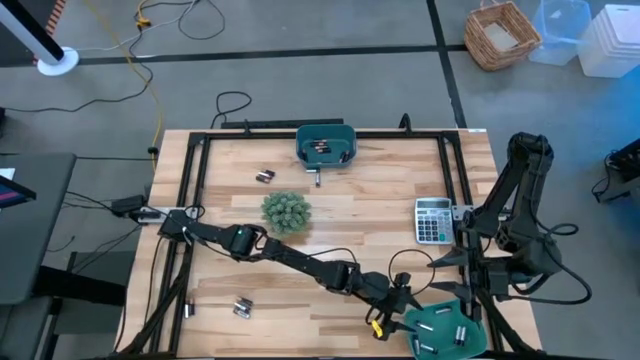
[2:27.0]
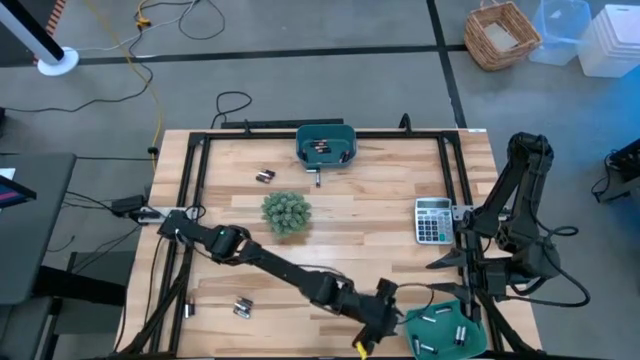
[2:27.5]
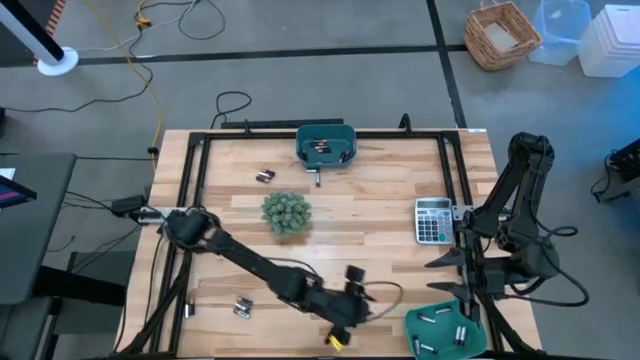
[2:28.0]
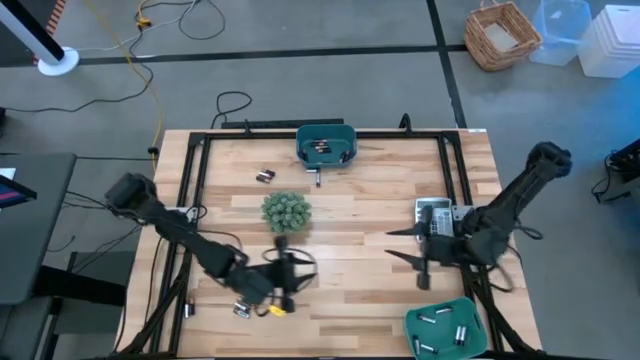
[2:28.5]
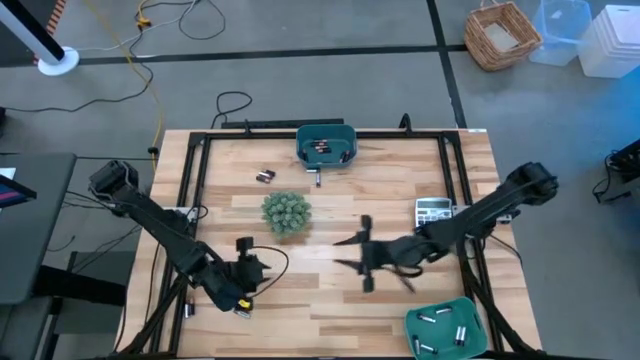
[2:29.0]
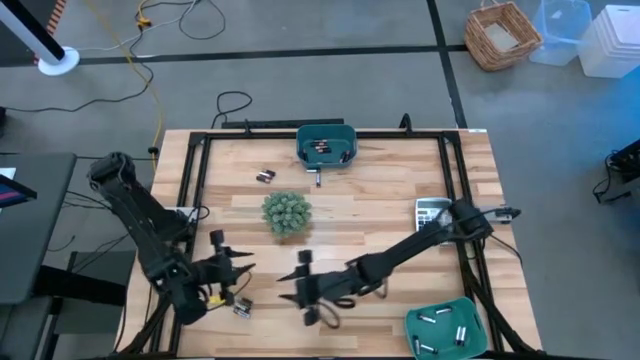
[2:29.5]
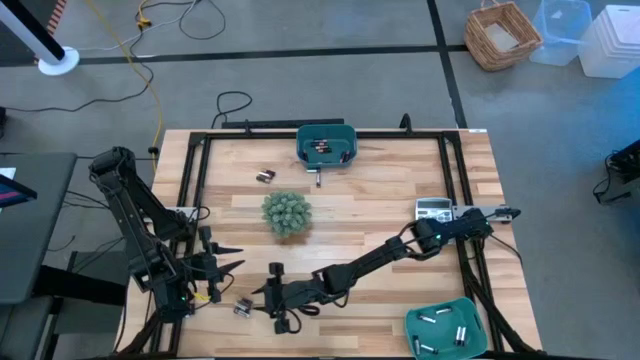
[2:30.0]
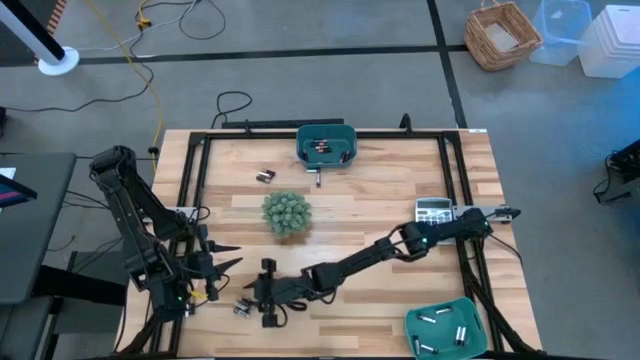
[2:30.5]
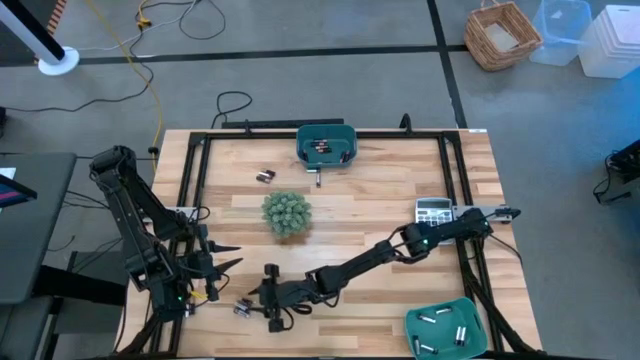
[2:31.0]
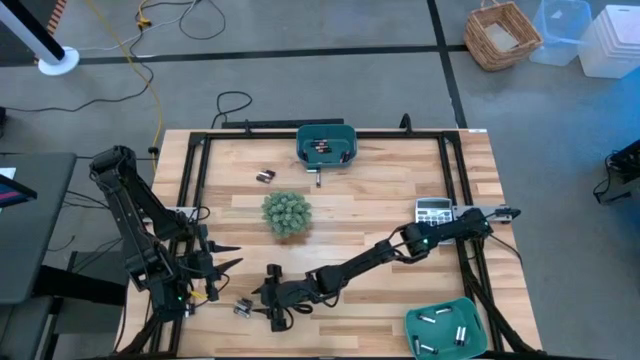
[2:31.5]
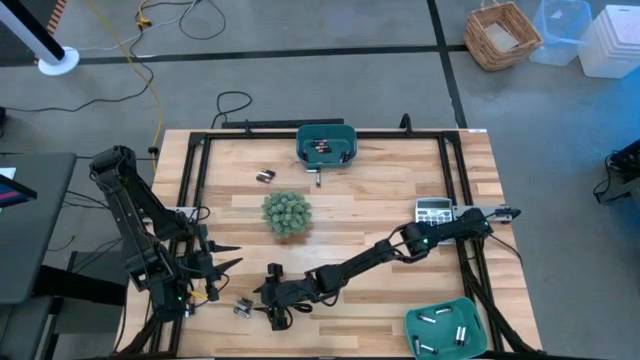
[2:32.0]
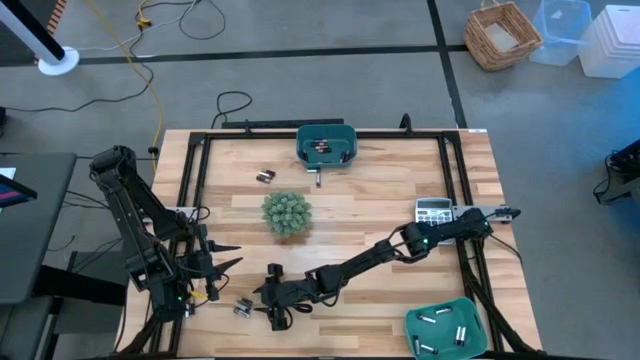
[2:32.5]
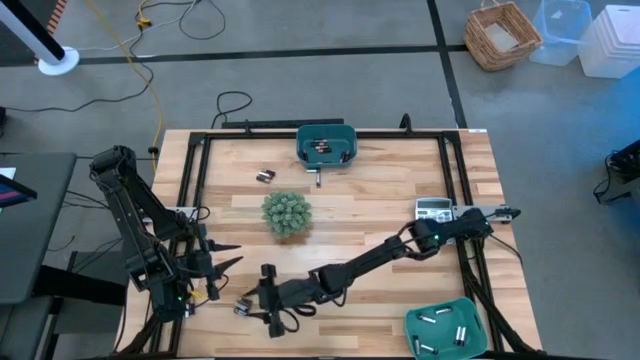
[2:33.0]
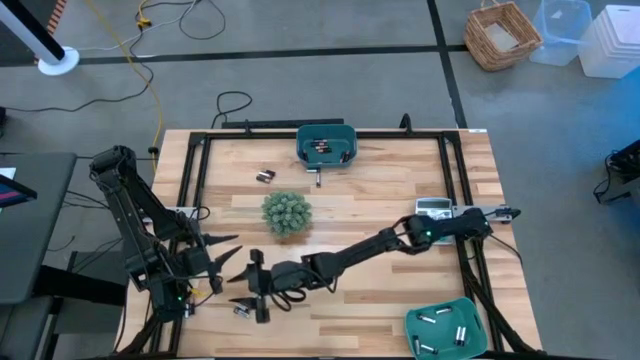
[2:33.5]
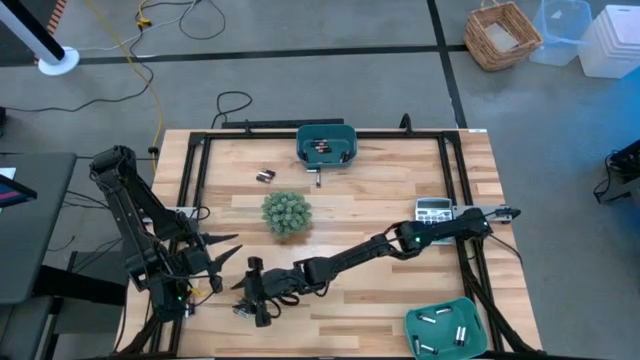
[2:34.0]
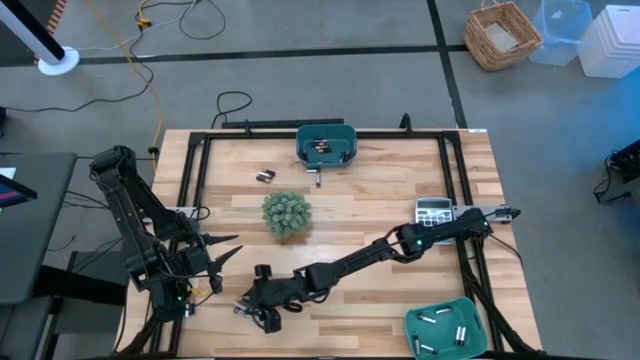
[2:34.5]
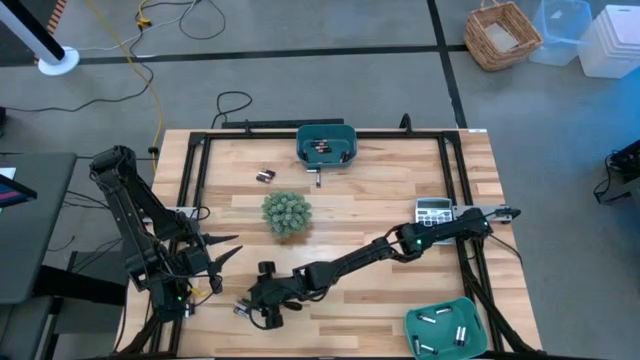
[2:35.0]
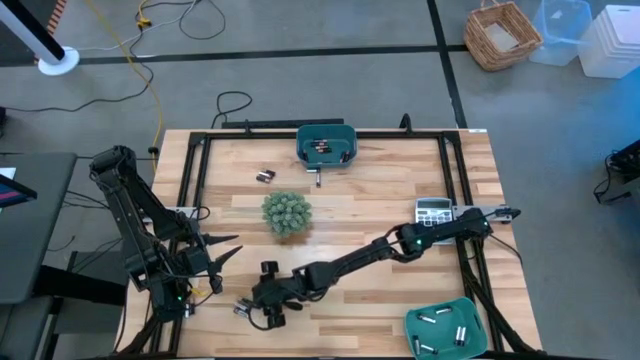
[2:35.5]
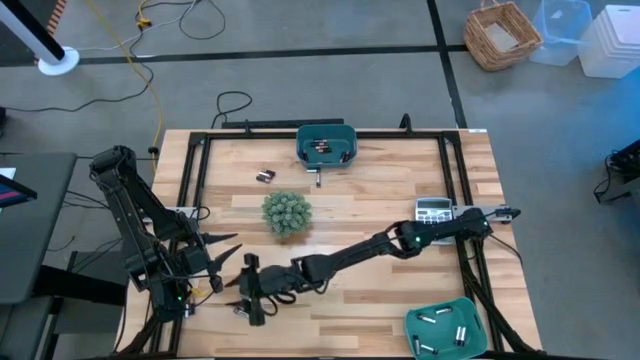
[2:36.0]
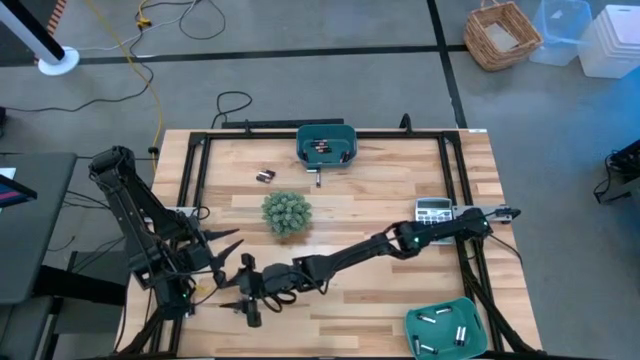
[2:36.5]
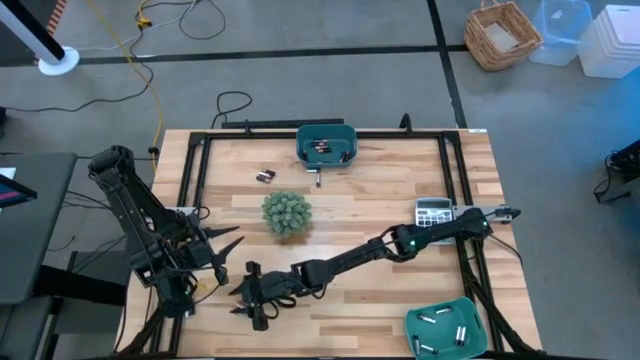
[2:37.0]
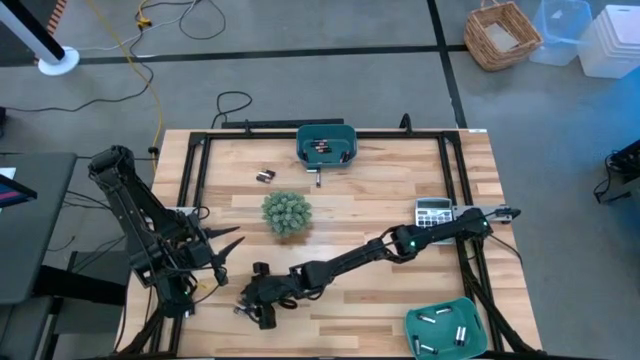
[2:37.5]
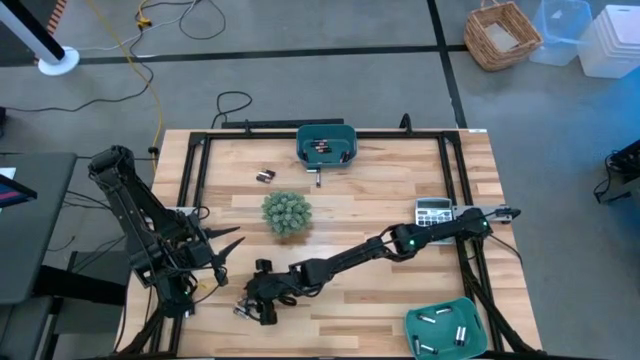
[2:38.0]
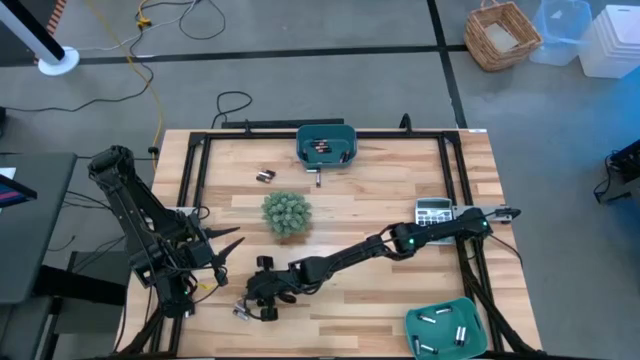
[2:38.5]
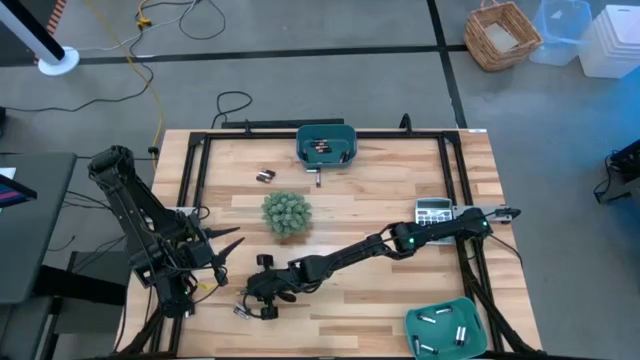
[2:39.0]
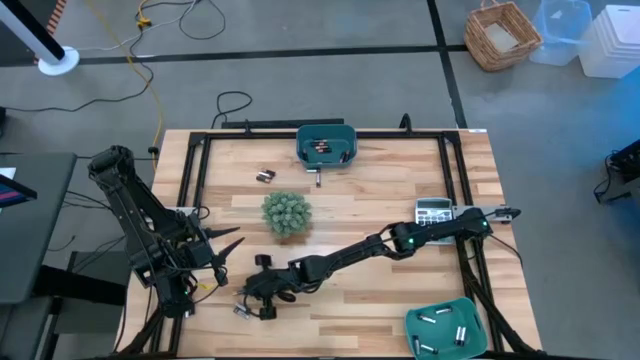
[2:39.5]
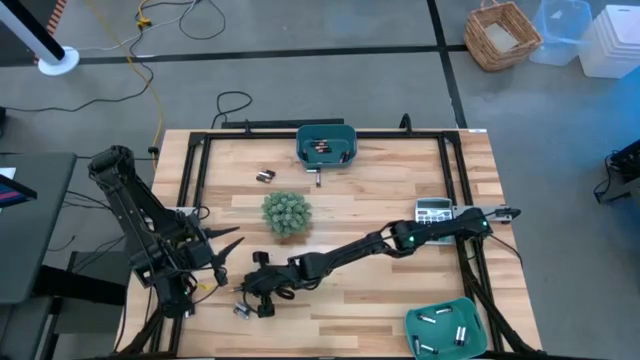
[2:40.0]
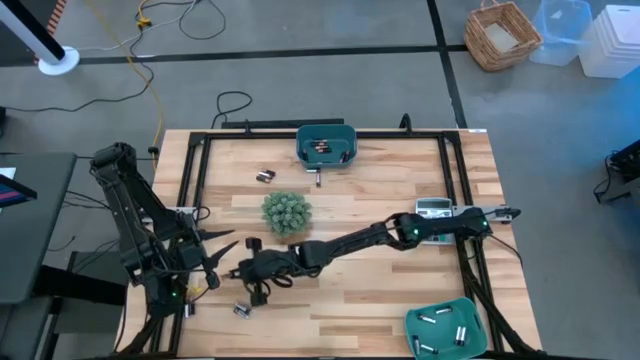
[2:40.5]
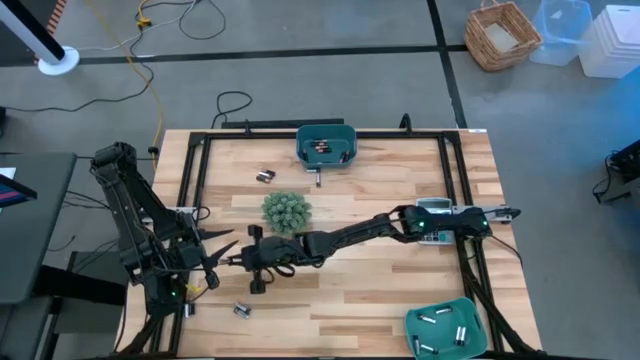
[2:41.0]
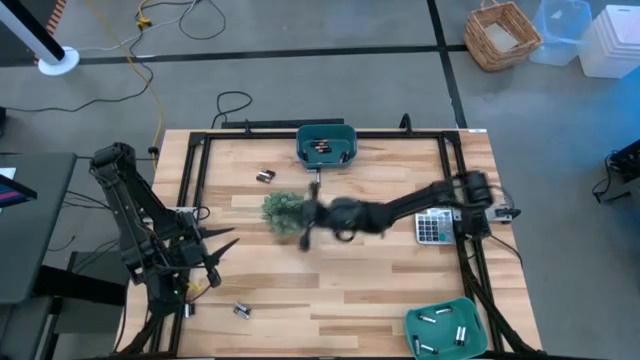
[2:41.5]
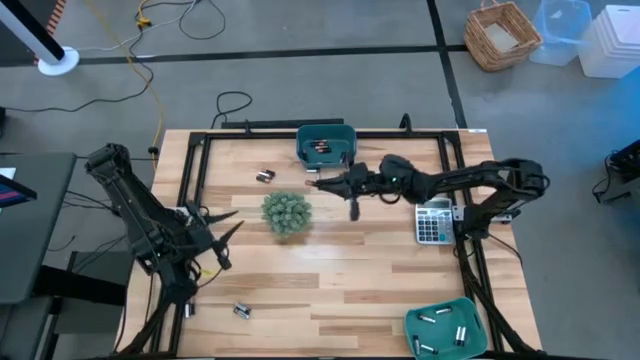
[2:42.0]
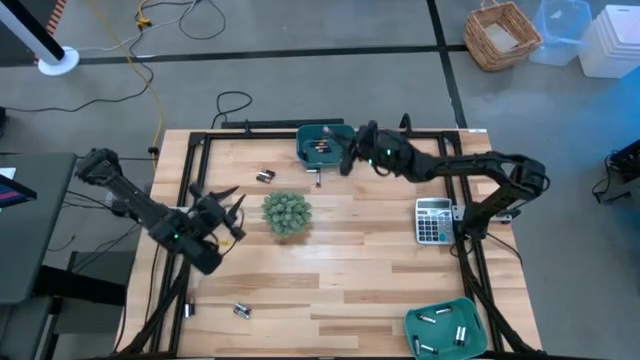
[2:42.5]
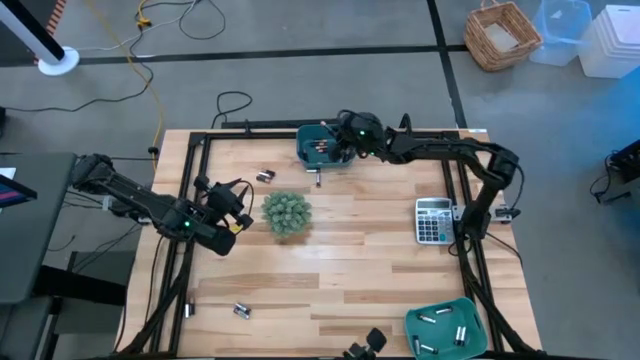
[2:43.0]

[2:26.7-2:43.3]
Task: Sort batteries
Put the black battery into the blue bin

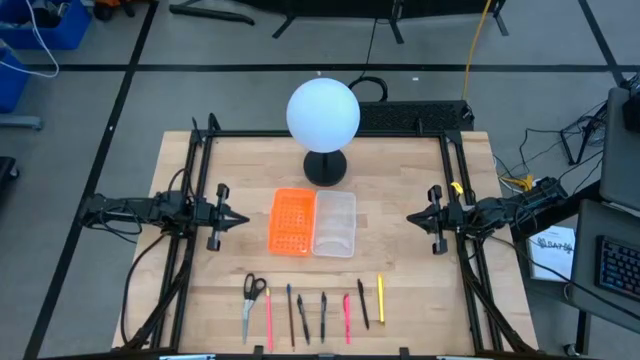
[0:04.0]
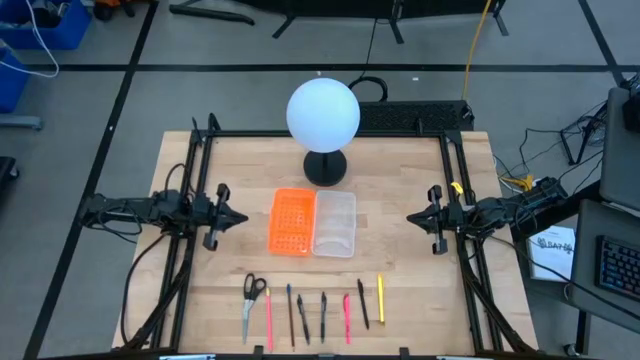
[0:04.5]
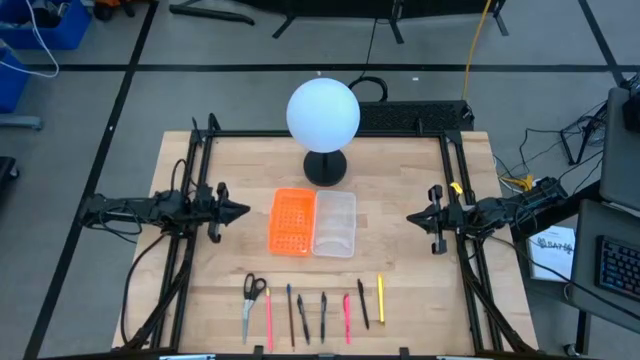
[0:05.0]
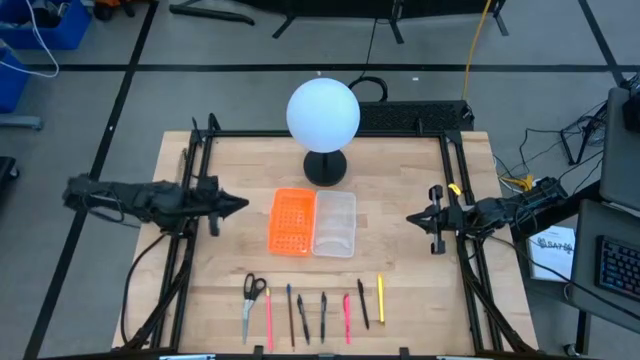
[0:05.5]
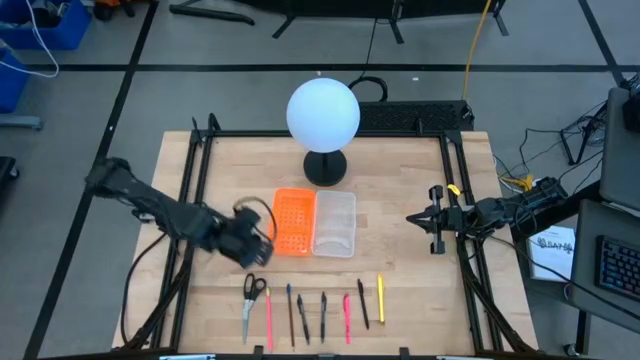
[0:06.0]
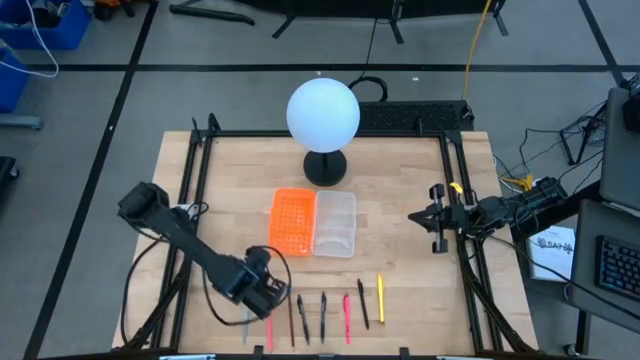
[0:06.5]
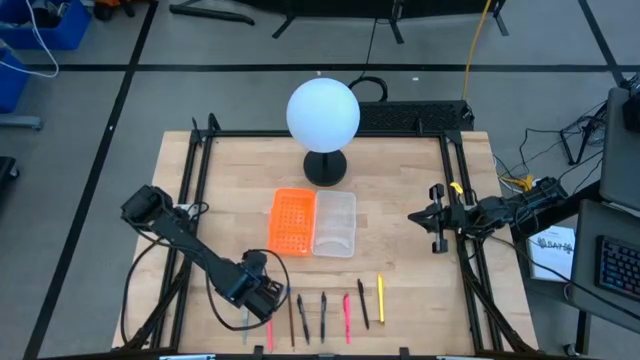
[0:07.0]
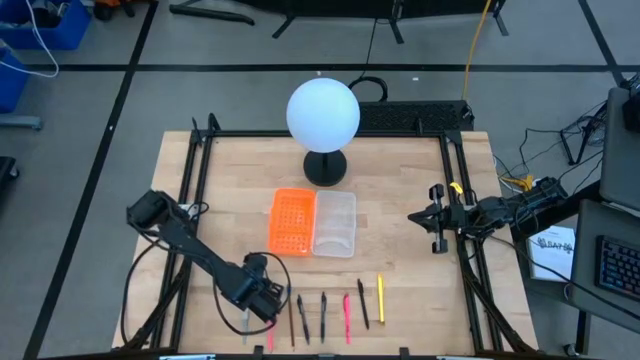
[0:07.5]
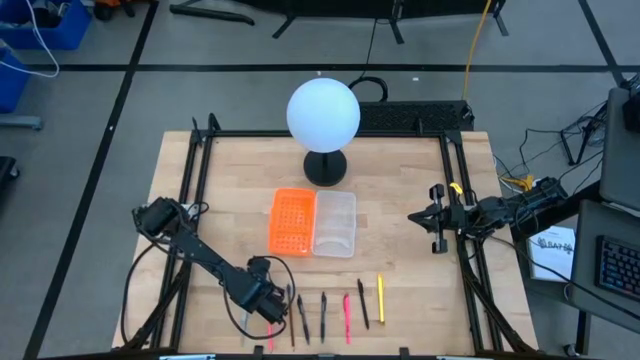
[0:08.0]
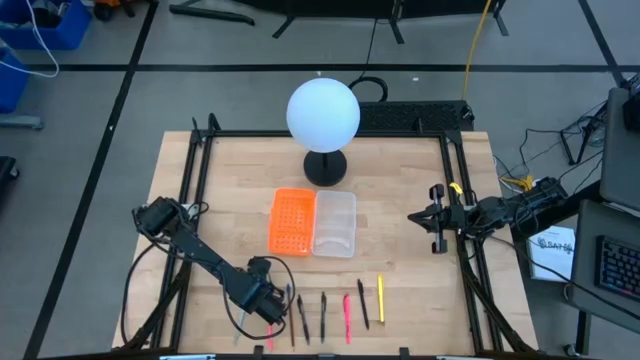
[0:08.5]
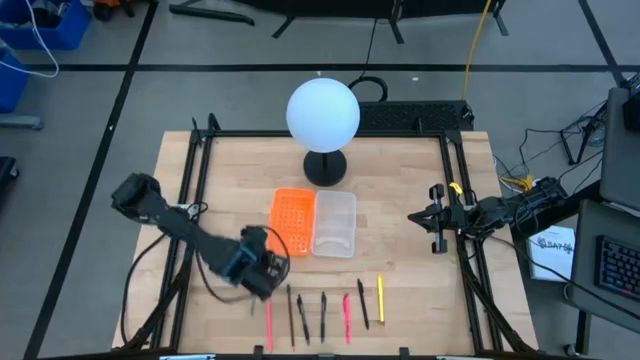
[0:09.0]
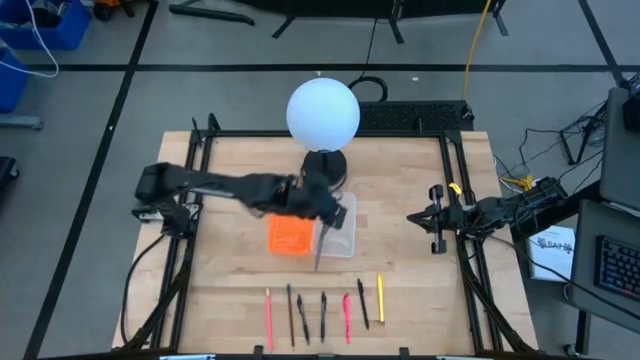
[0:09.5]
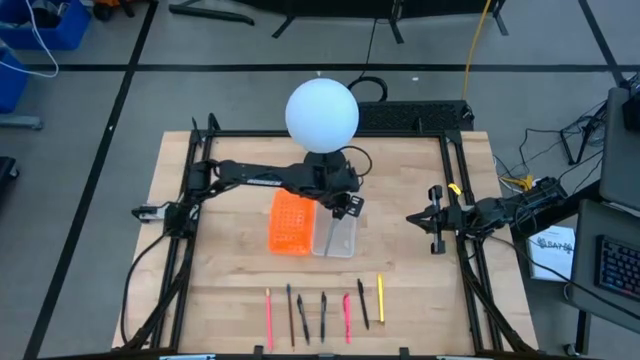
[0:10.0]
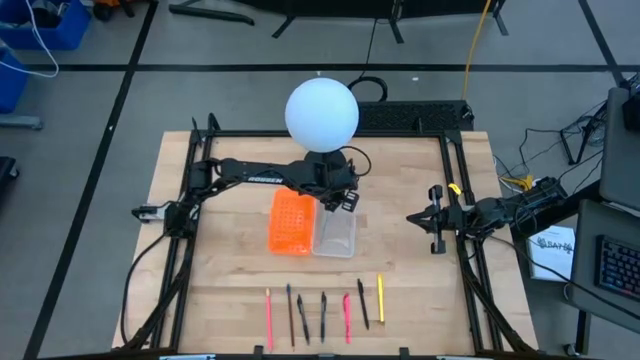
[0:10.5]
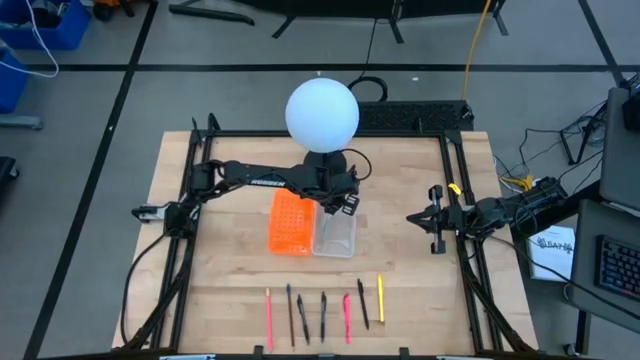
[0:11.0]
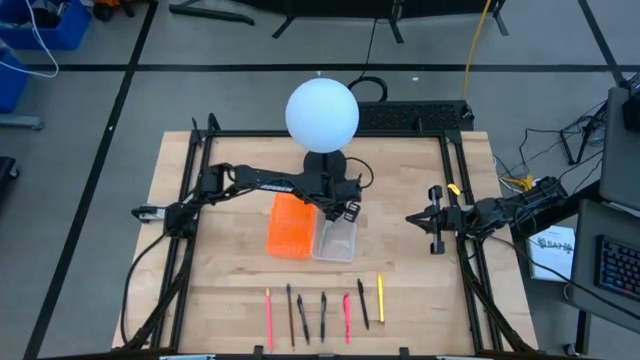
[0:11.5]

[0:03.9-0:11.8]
Task: Pick & place school supplies into a supply box
Put the black scissors into the orange supply box
